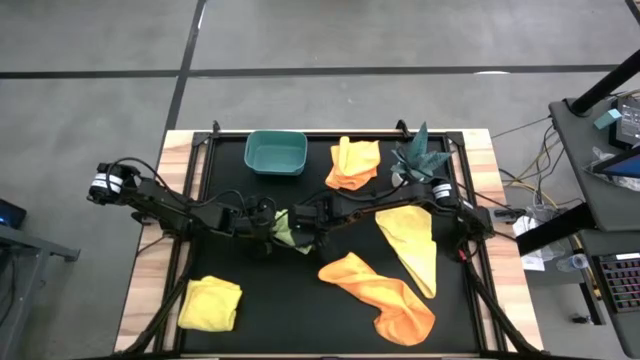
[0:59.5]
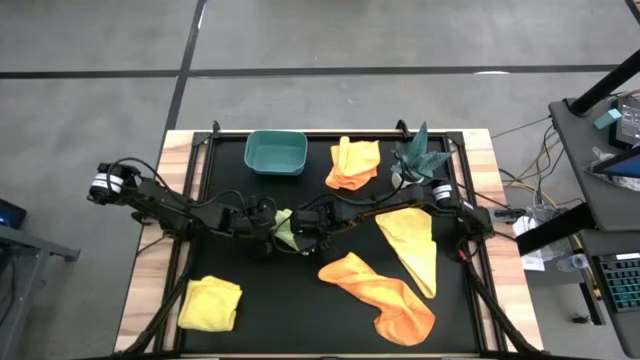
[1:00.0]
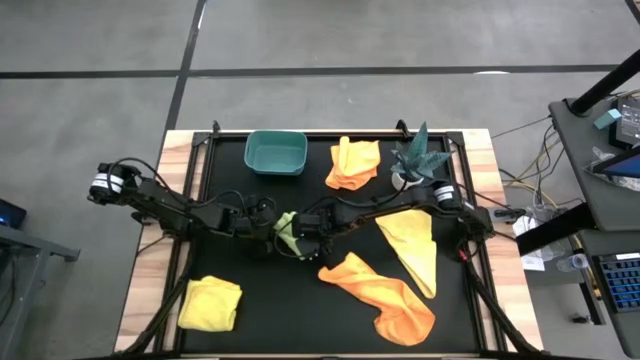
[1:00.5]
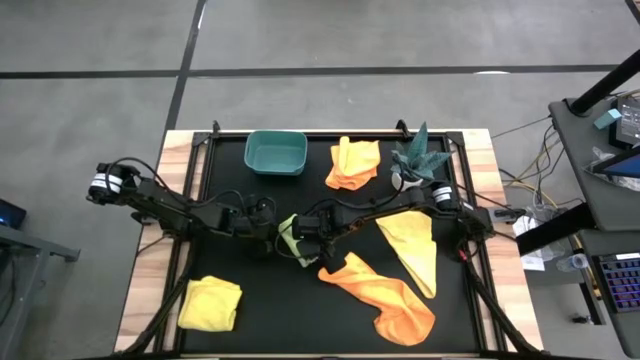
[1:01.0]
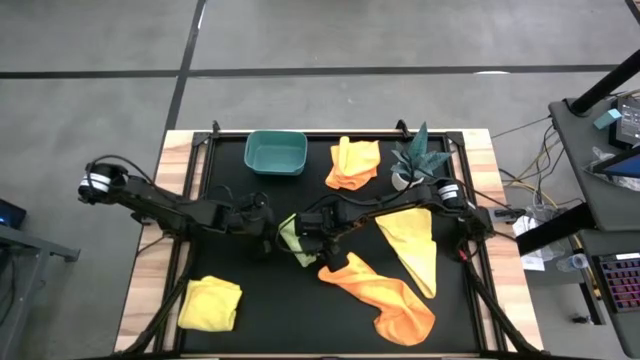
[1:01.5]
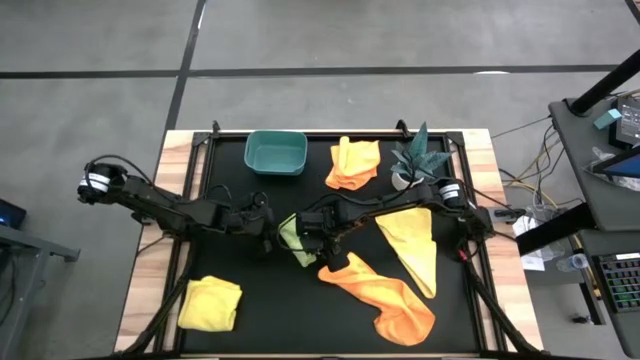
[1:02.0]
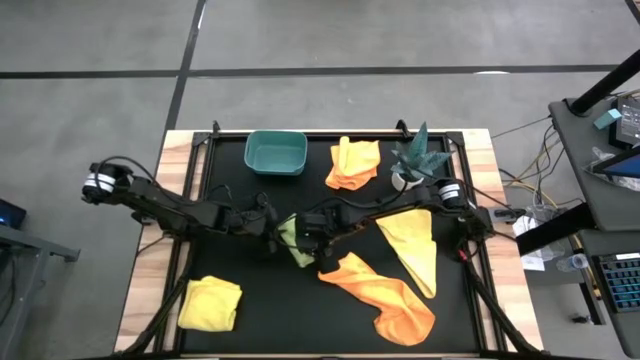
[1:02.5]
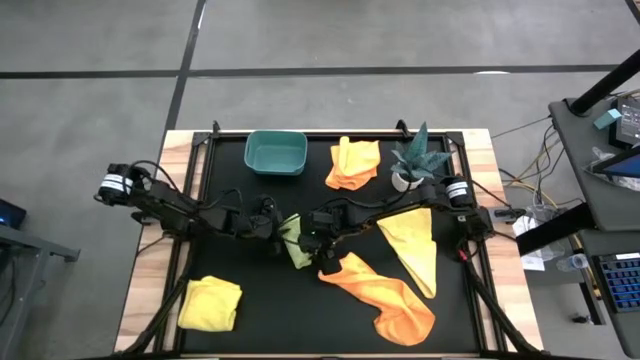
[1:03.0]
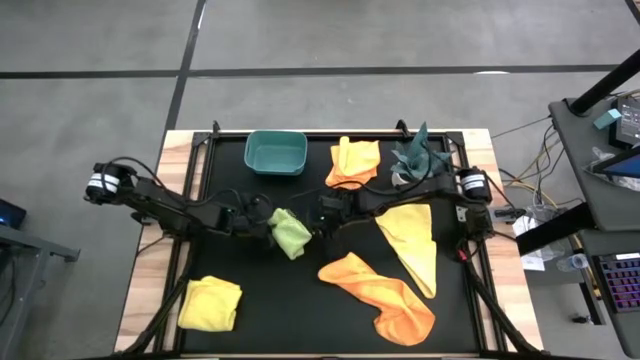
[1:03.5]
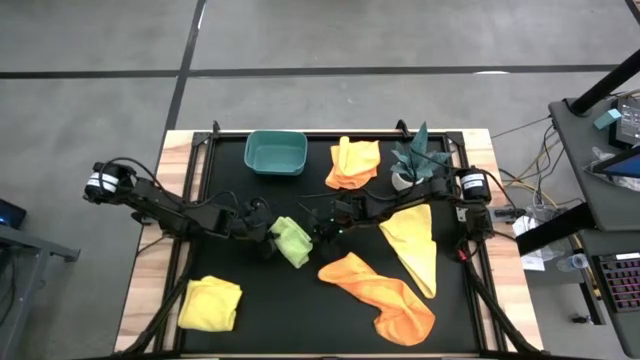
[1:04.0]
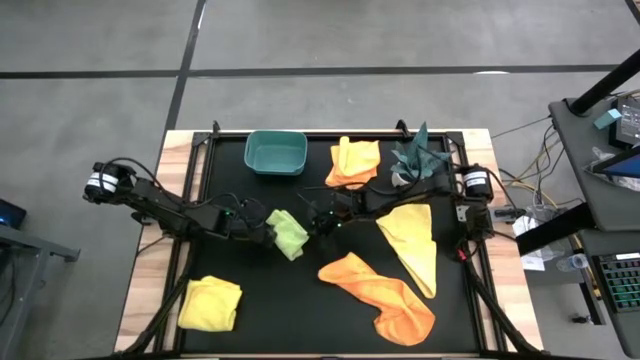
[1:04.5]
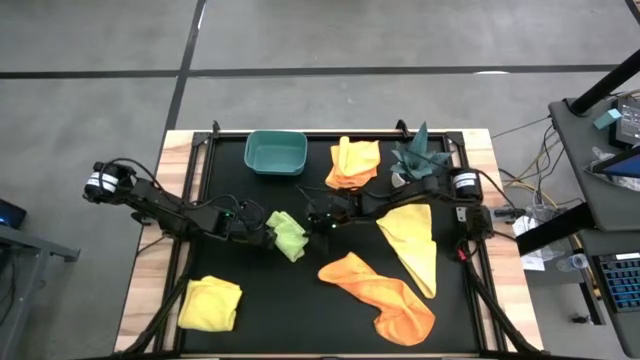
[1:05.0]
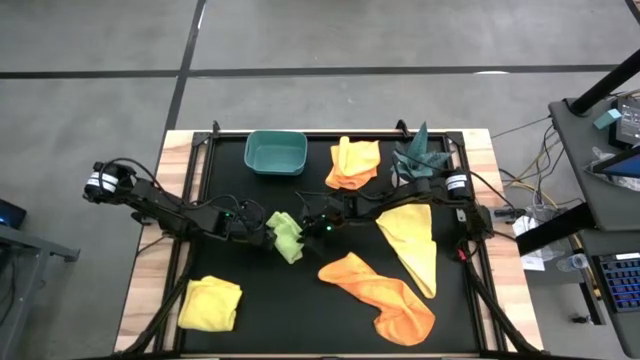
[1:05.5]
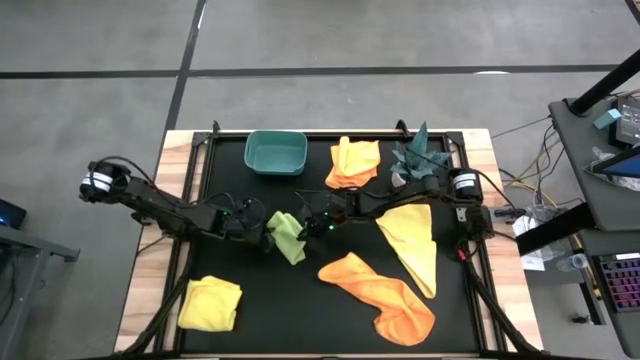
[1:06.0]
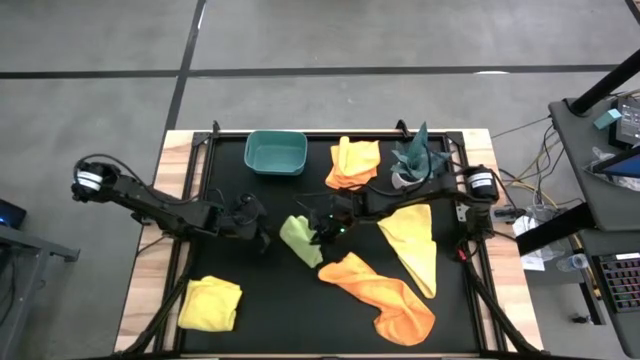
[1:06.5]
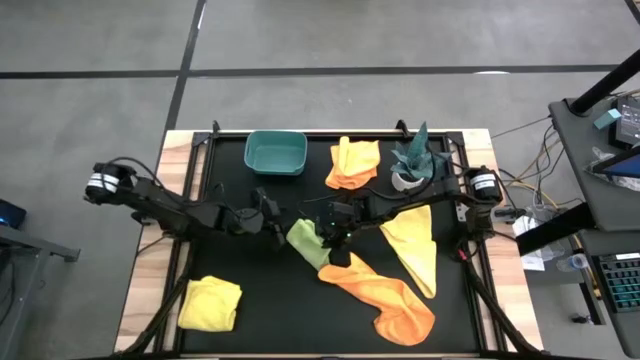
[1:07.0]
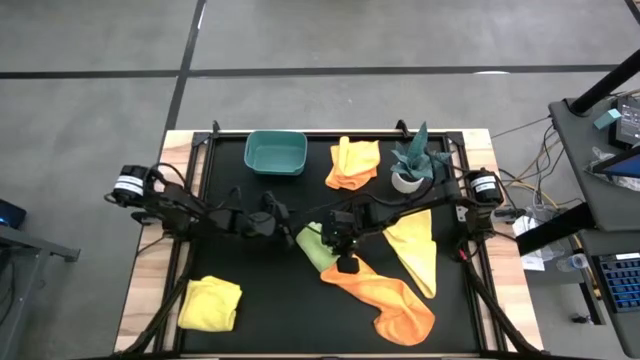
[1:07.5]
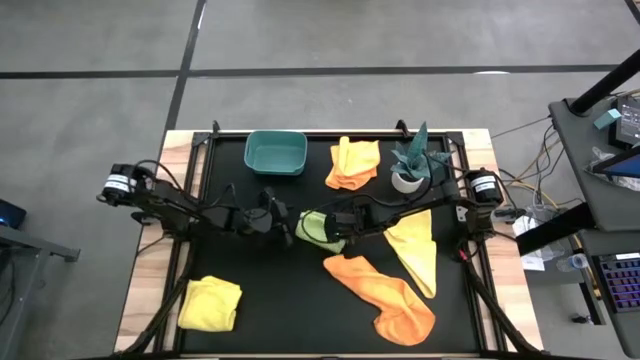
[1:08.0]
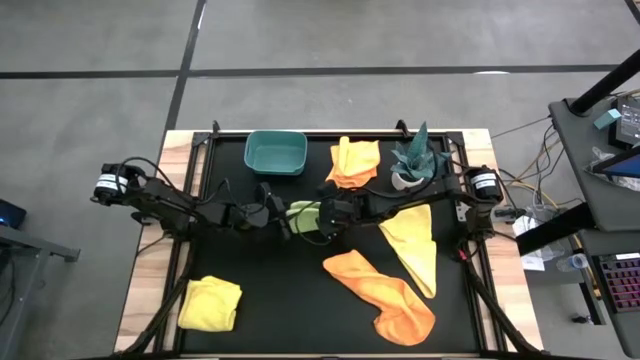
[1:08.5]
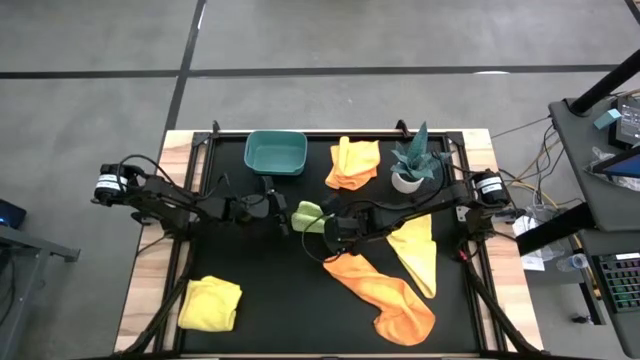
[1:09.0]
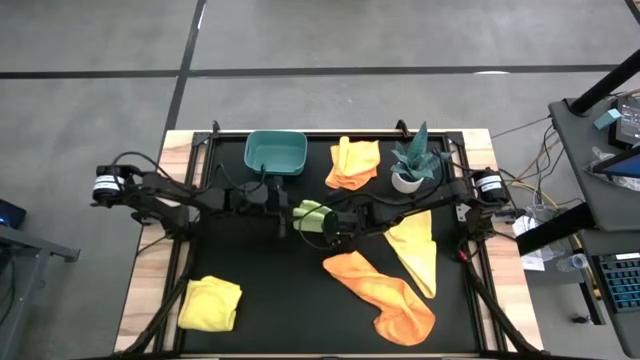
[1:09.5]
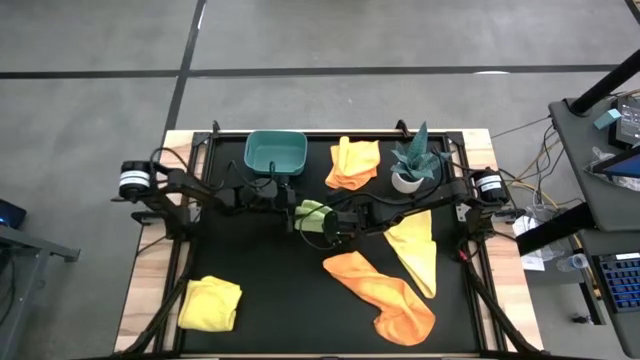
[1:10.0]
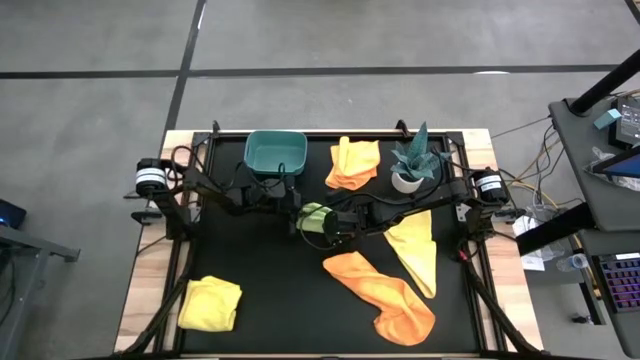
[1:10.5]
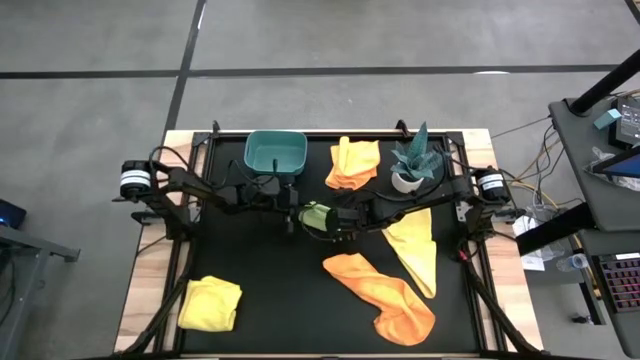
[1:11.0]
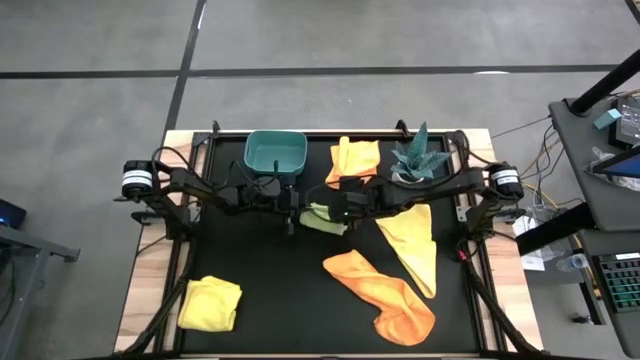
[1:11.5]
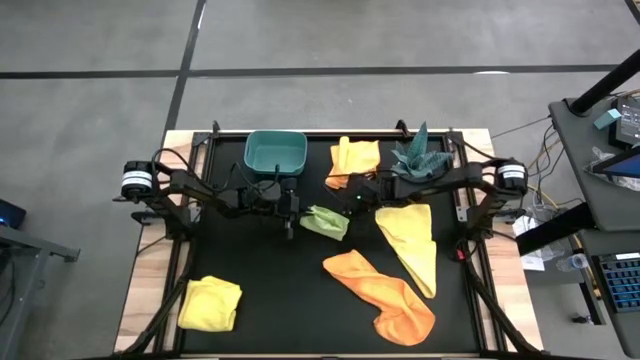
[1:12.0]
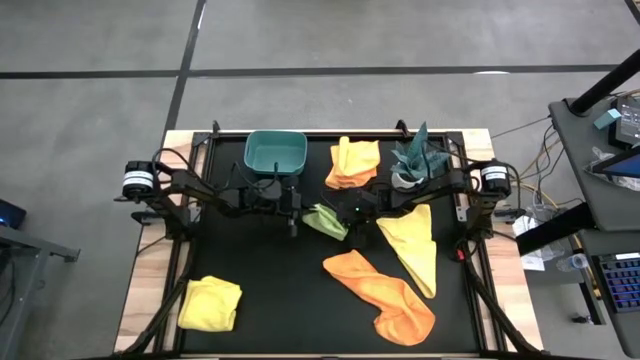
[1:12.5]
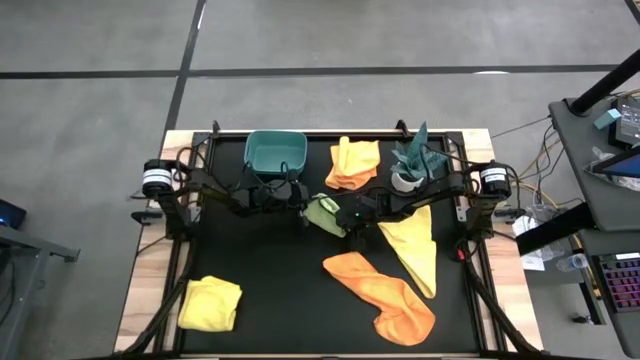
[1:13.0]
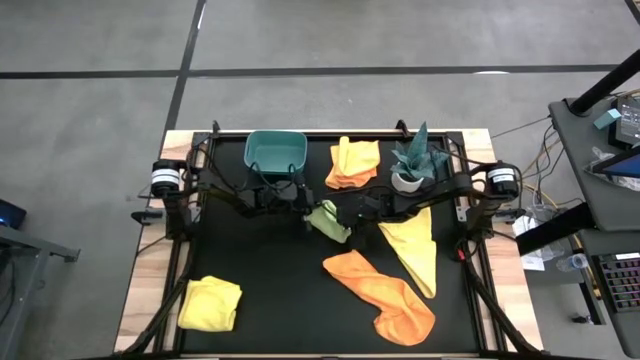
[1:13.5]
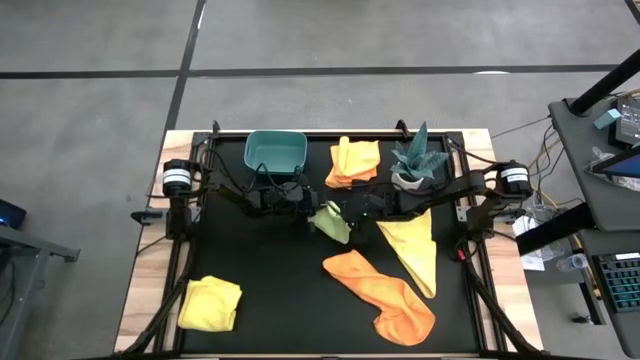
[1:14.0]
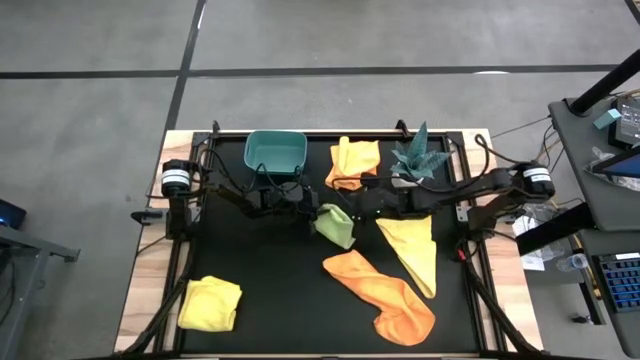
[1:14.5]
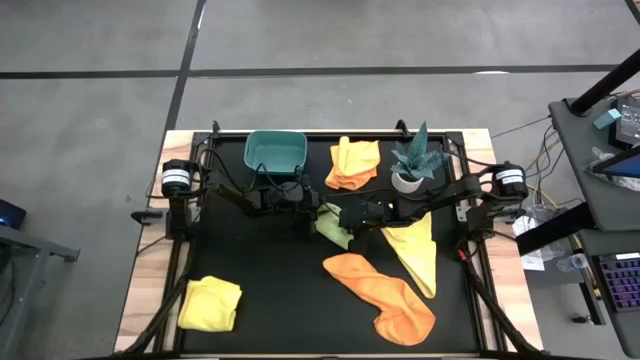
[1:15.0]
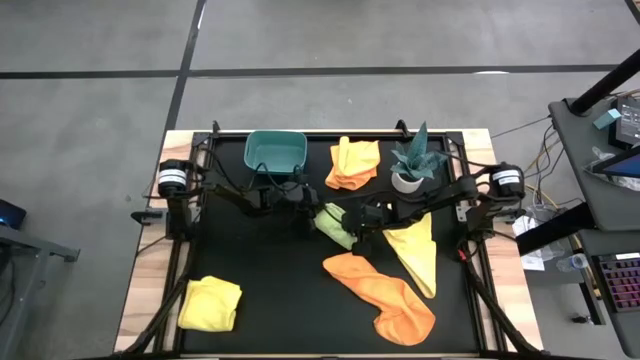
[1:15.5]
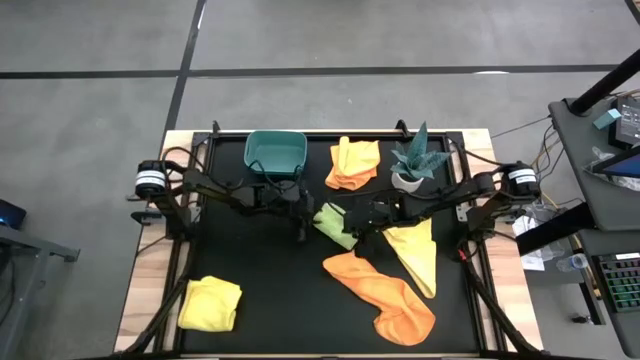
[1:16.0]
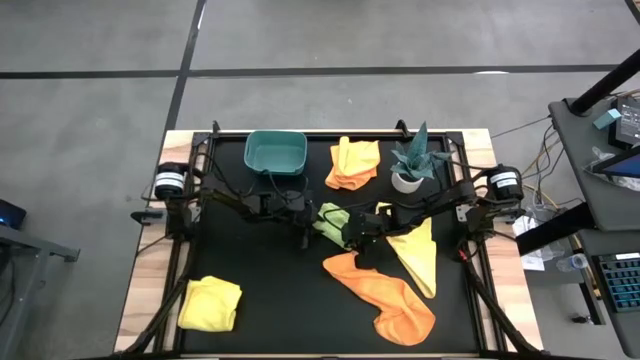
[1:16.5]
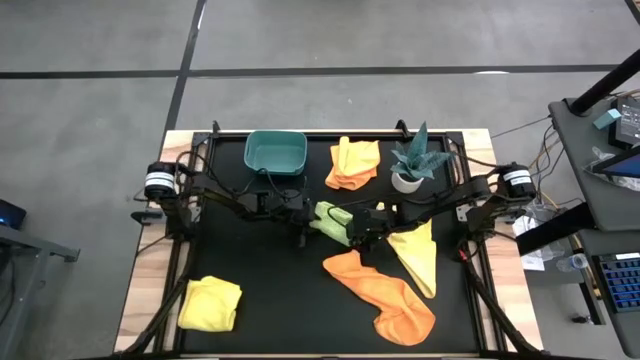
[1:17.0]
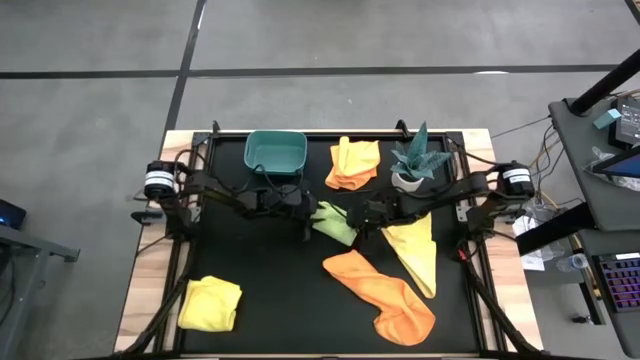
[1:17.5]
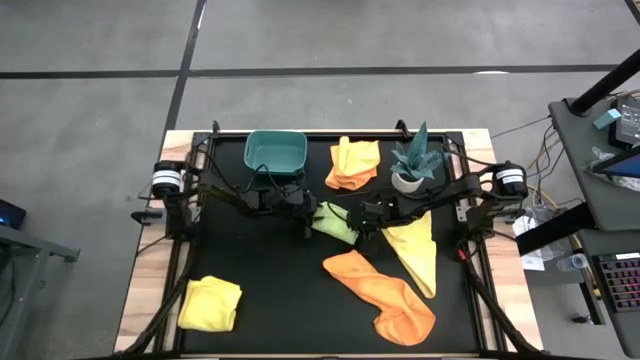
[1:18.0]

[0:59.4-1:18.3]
Task: Fold microfiber towels
Fold the green microfiber cloth

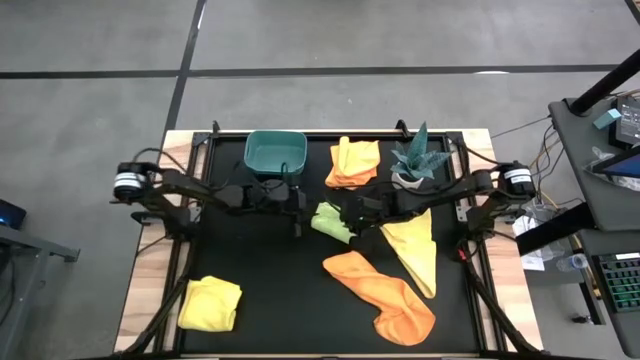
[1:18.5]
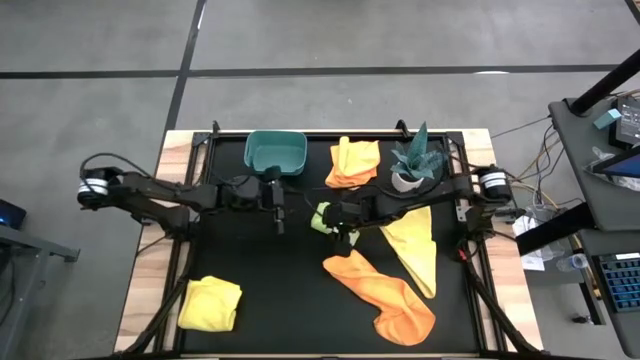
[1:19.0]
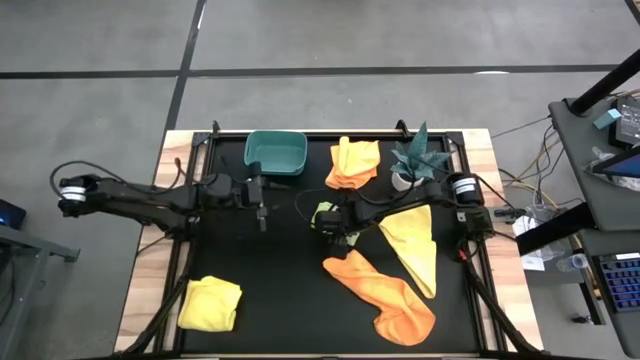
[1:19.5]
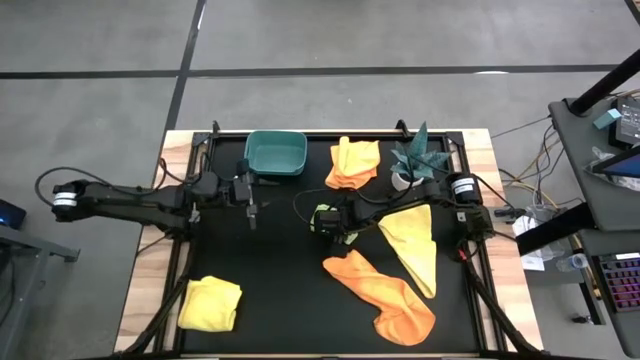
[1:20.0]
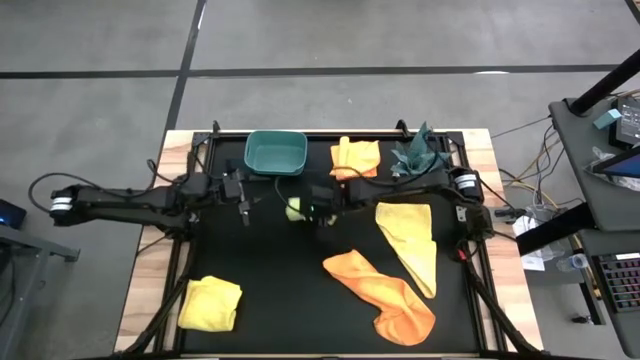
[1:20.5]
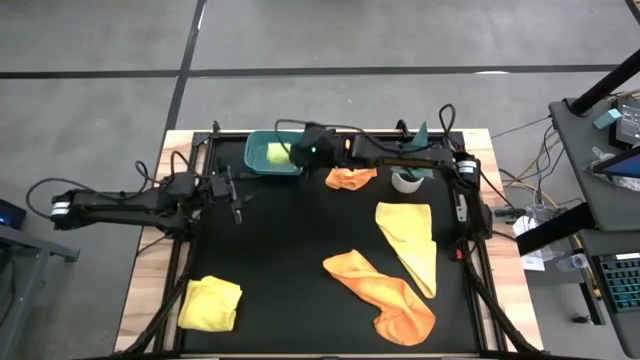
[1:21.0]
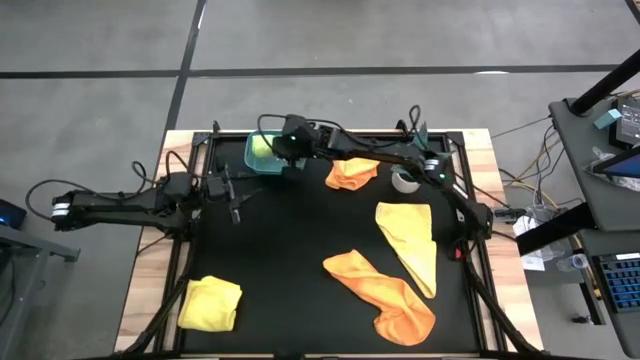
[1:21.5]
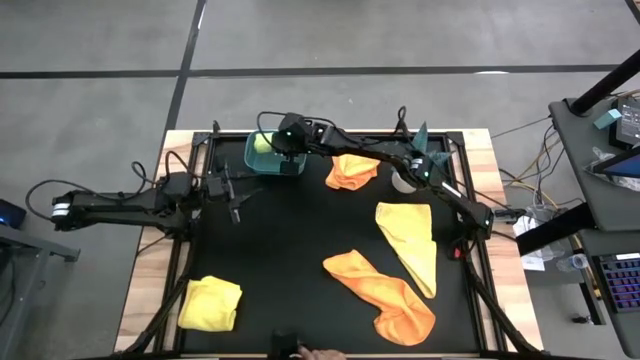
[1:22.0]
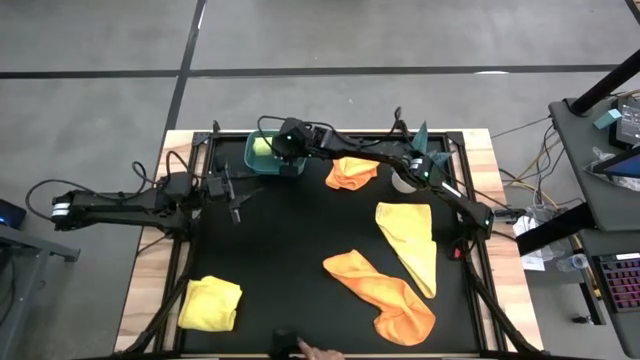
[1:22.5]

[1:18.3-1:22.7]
Put the green microfiber cloth into the blue bin
